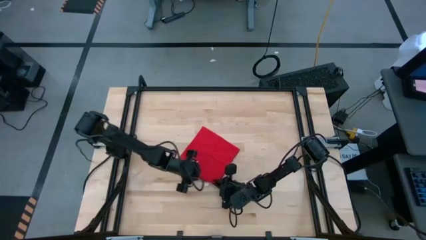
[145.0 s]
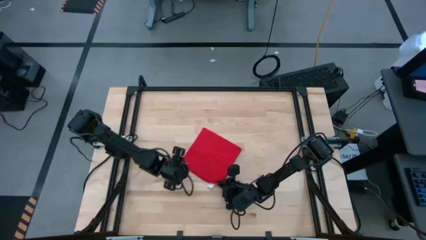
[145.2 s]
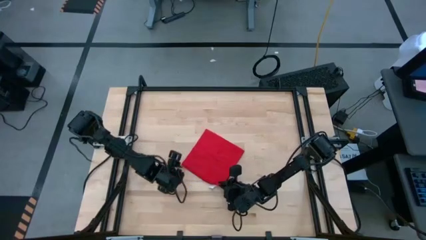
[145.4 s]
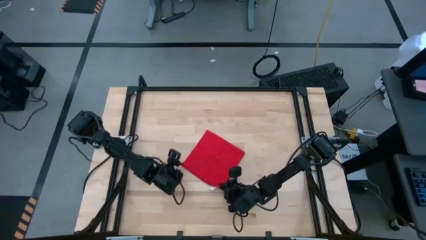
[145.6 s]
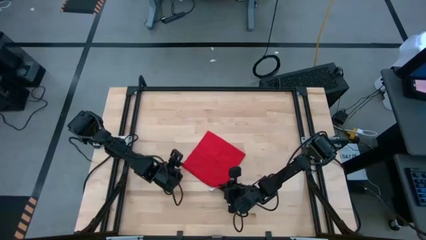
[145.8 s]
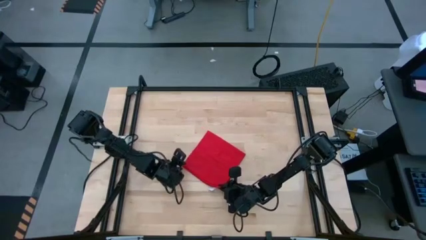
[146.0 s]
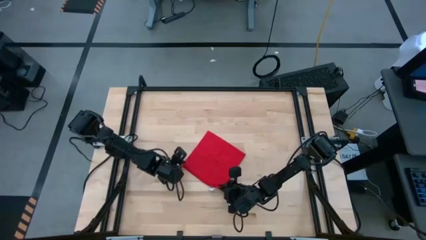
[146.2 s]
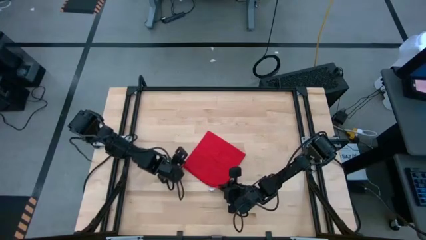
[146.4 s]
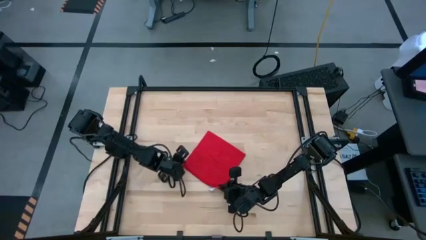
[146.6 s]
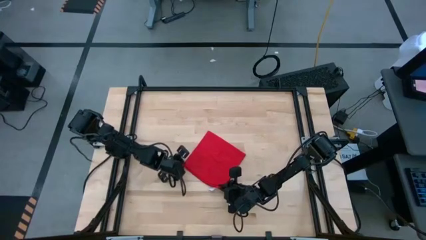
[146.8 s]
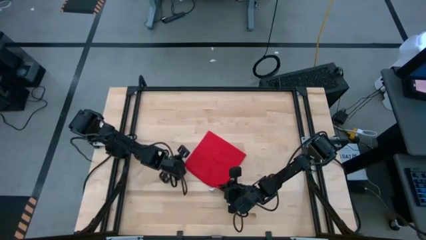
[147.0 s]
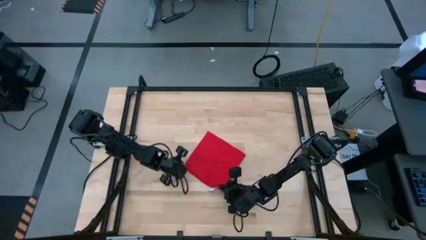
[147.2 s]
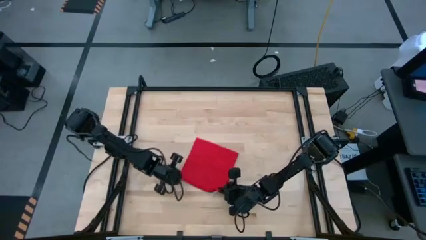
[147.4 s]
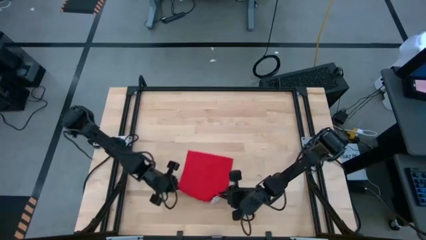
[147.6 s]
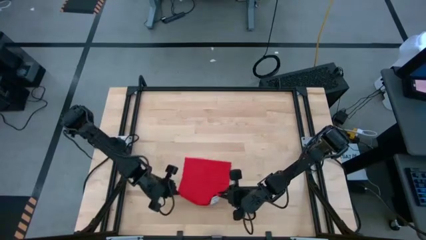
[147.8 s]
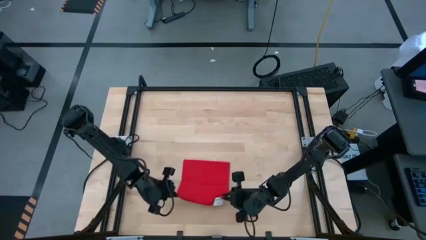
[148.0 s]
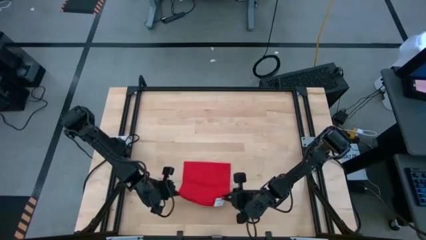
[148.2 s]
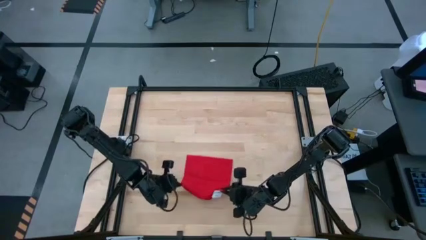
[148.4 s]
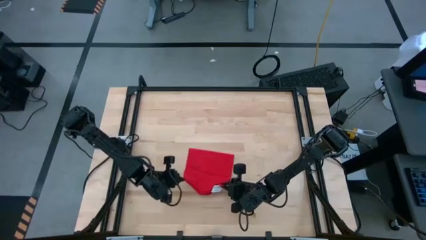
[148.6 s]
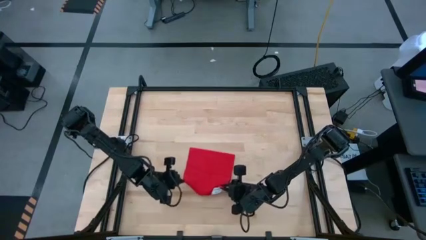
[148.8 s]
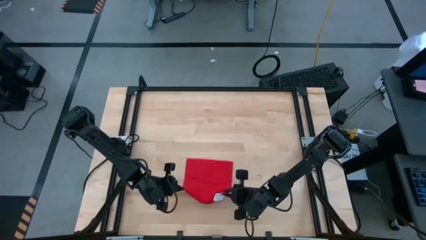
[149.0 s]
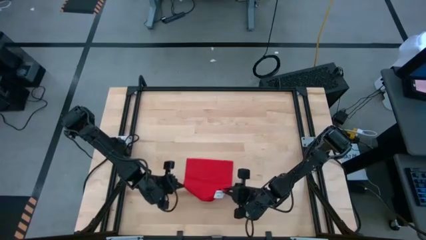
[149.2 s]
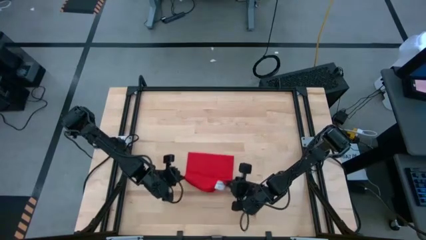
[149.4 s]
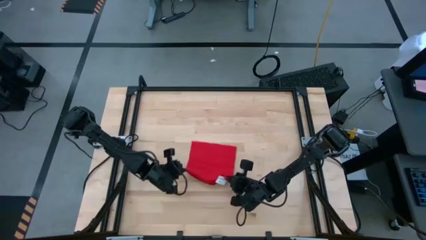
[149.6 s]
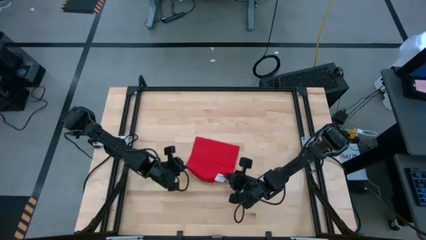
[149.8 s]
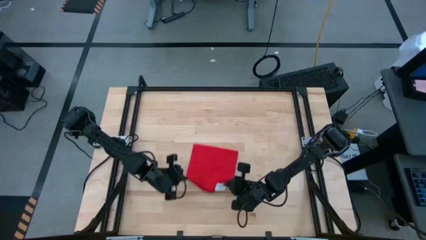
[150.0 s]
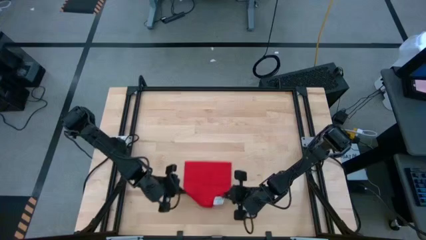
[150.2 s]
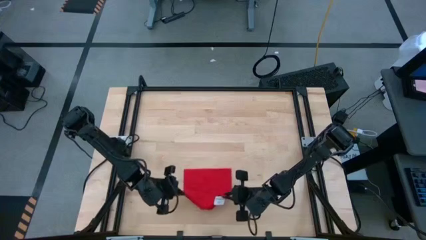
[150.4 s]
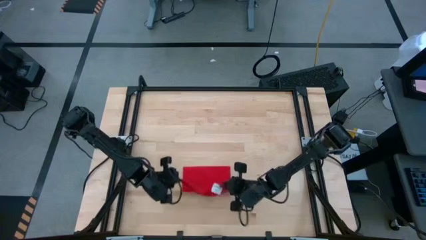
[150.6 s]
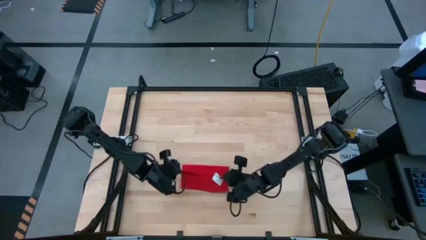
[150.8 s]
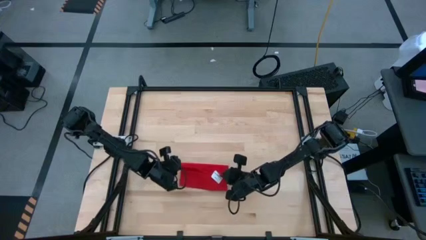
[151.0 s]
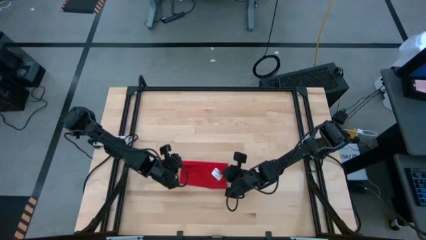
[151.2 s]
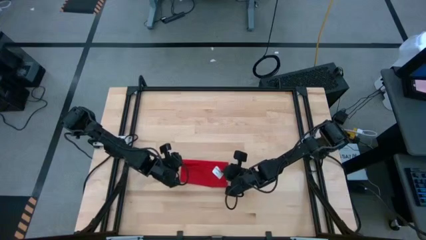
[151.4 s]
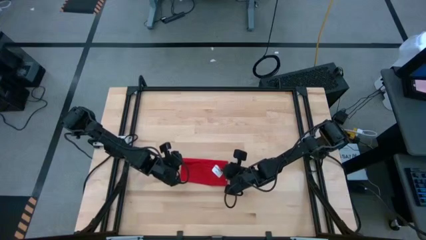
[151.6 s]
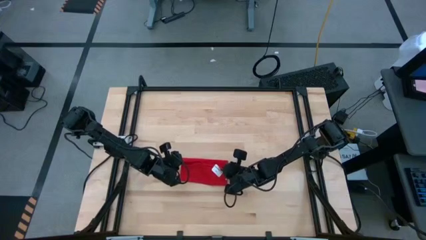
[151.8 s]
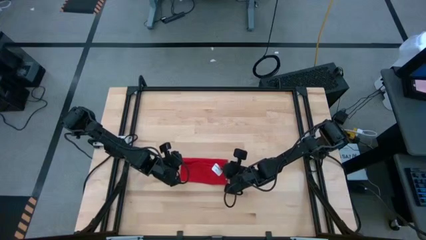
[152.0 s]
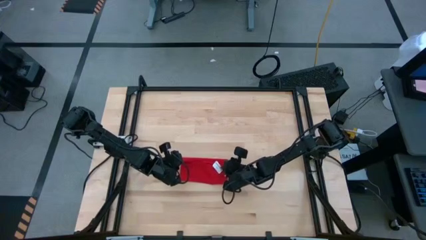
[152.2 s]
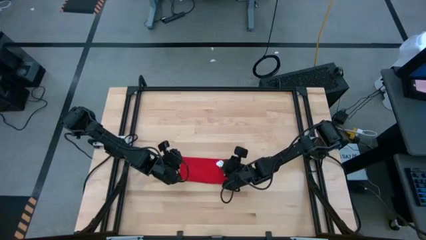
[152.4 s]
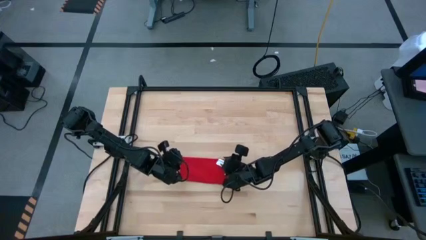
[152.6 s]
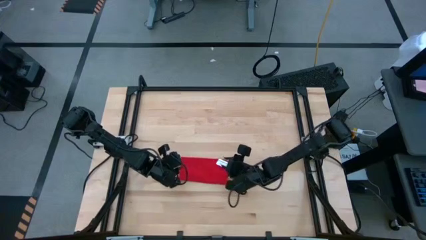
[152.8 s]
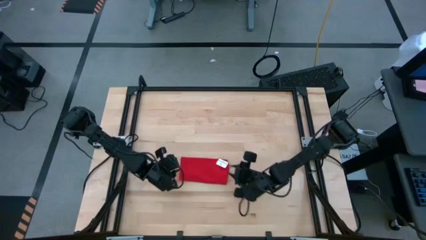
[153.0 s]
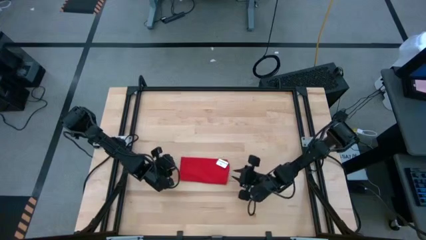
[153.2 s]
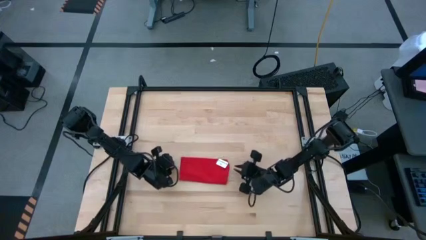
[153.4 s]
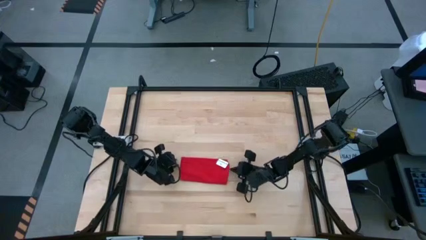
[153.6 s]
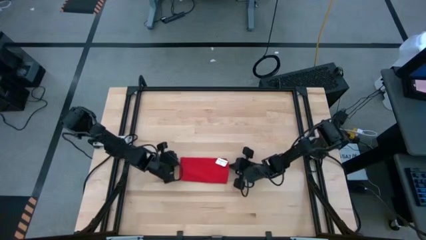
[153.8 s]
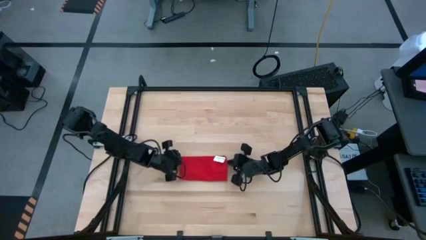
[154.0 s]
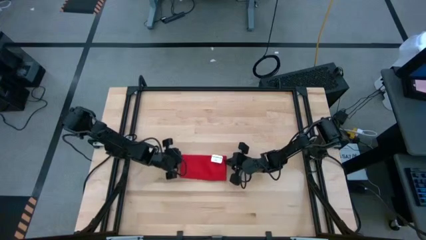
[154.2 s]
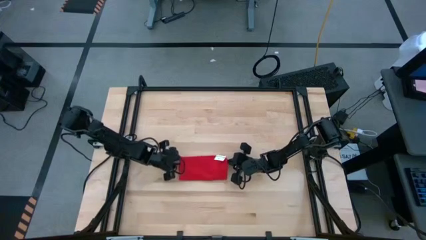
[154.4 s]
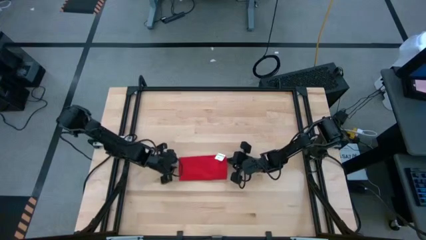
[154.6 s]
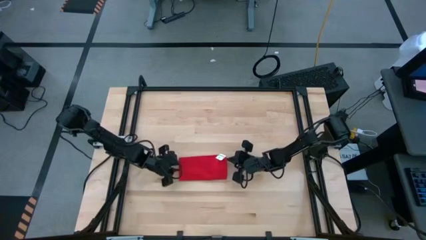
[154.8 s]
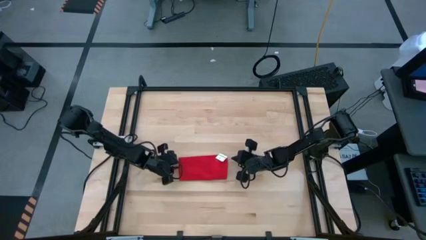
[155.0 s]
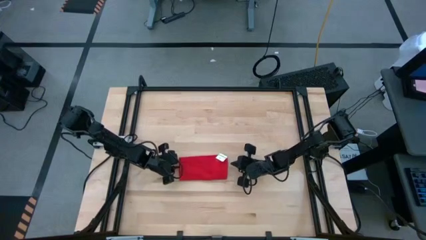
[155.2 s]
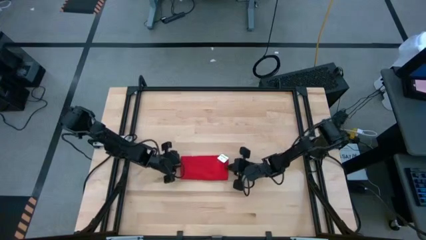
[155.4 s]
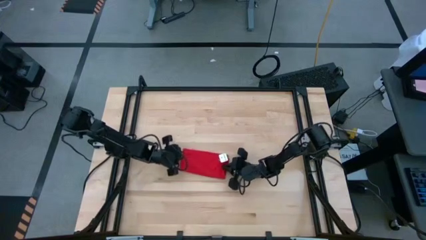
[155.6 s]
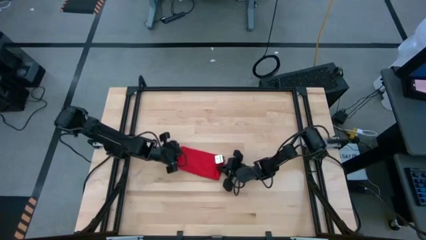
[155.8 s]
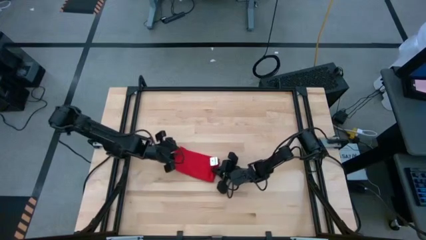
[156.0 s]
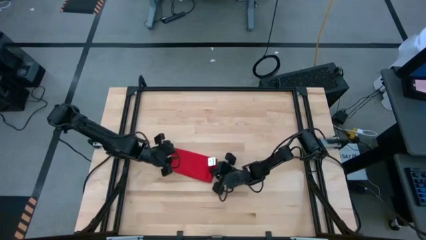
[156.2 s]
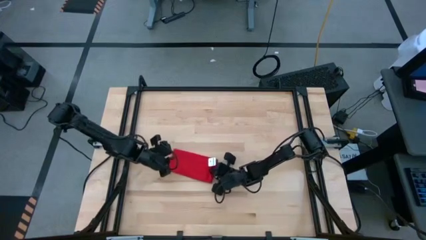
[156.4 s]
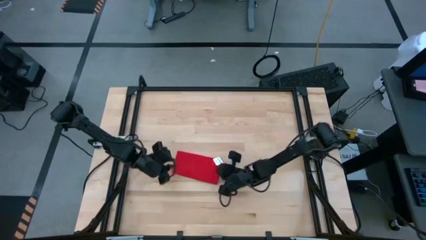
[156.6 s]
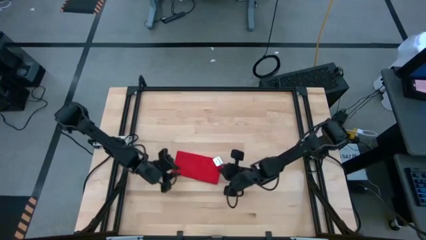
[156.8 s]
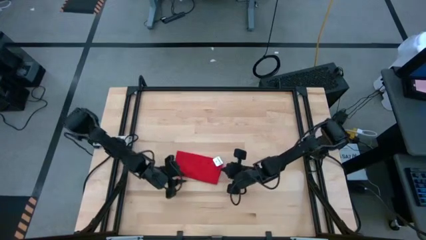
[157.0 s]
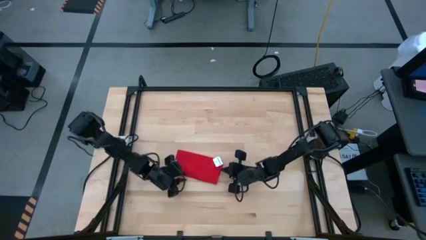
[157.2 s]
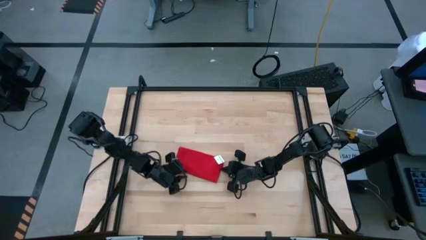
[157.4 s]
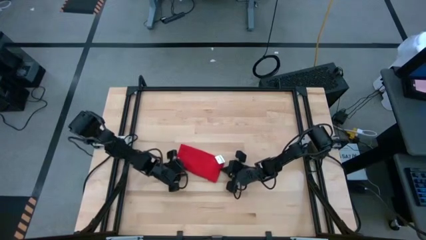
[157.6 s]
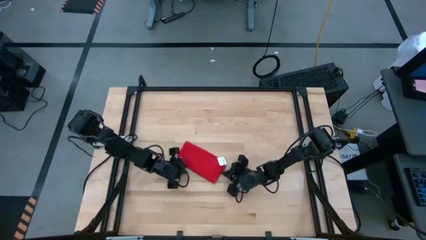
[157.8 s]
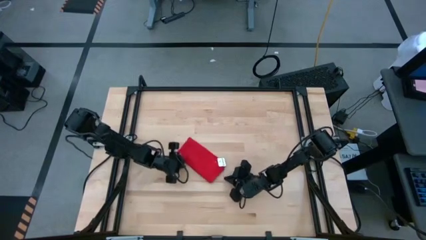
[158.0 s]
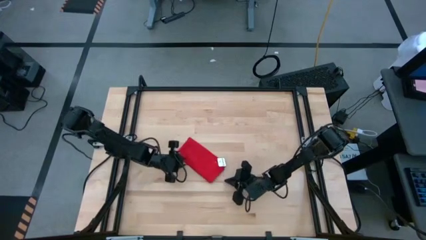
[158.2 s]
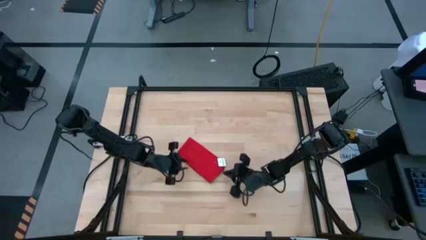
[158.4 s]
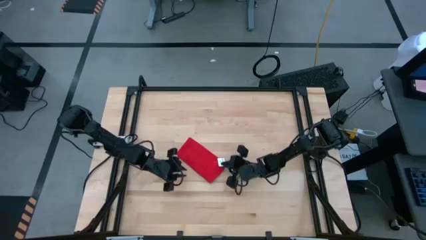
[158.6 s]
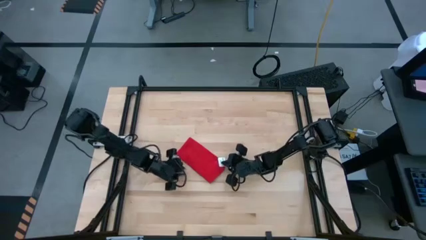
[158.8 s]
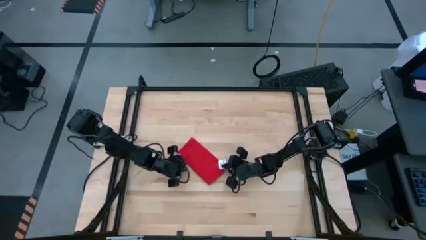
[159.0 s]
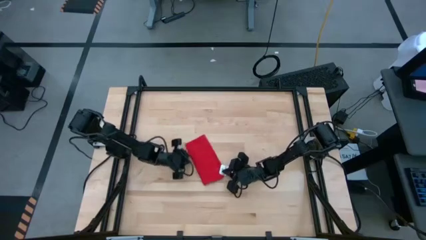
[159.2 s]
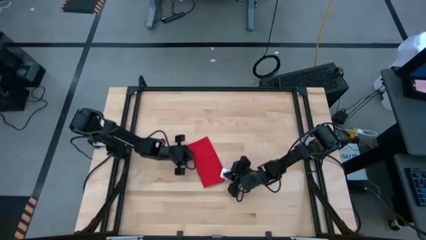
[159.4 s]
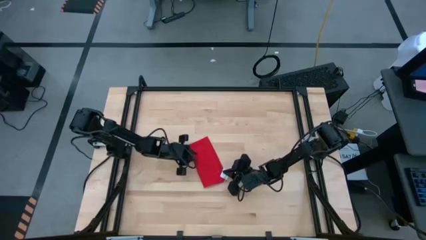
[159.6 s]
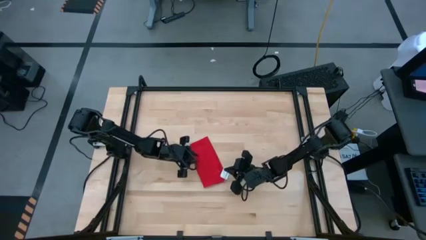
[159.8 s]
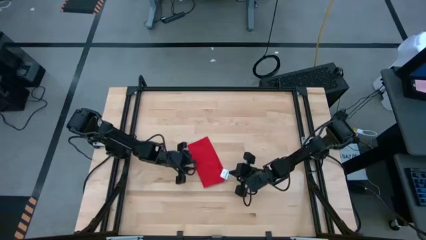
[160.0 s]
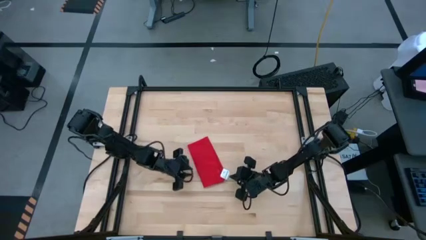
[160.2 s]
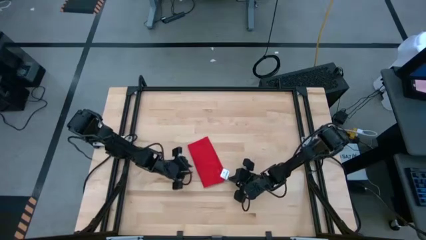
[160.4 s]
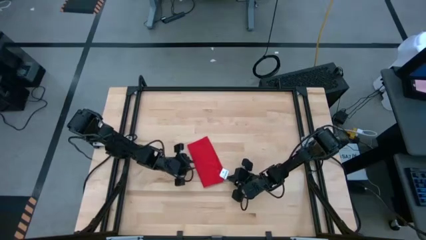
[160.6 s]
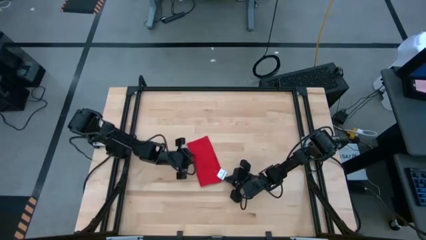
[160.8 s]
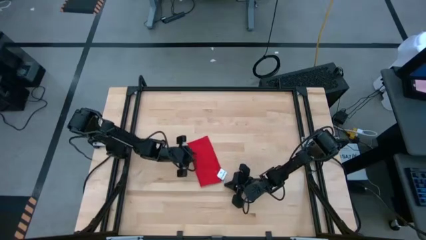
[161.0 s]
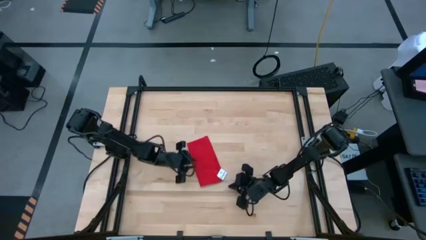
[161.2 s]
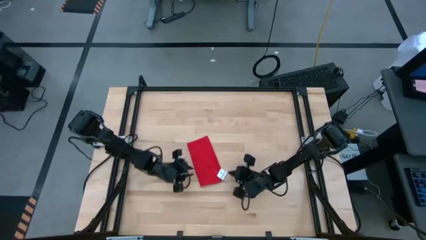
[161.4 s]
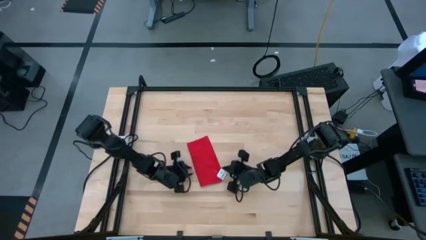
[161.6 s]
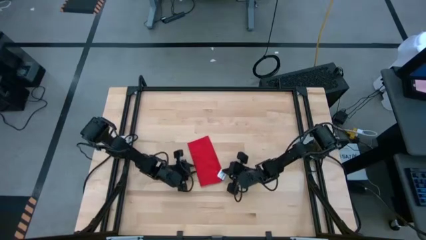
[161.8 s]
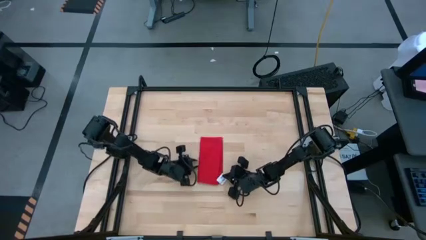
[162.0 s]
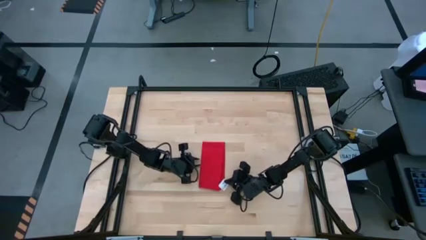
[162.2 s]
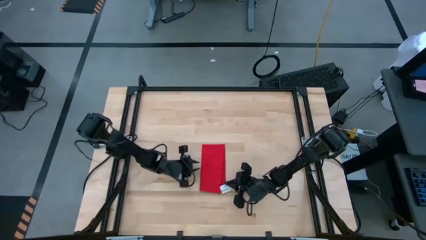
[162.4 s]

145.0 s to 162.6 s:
Task: Roll napkin
Fold the red napkin
